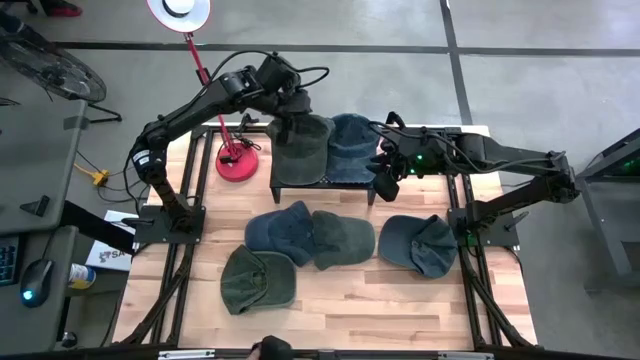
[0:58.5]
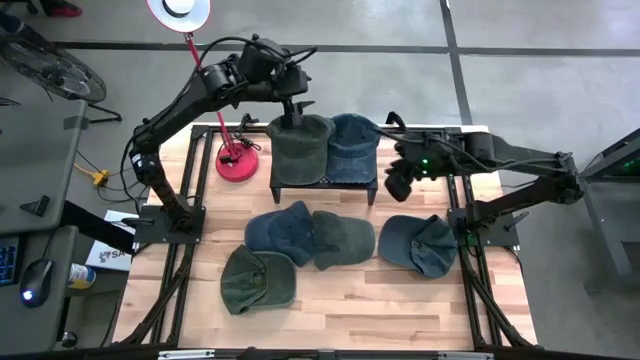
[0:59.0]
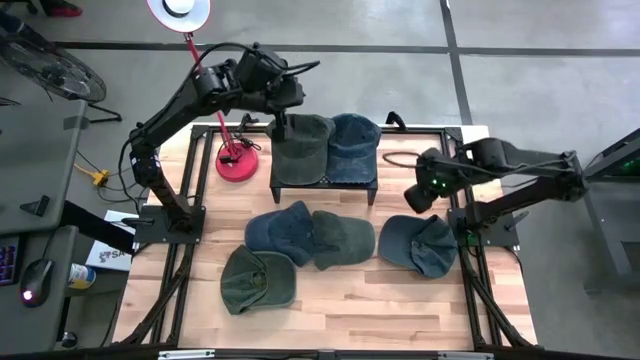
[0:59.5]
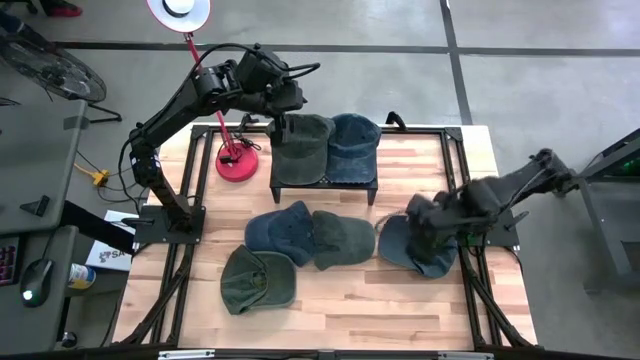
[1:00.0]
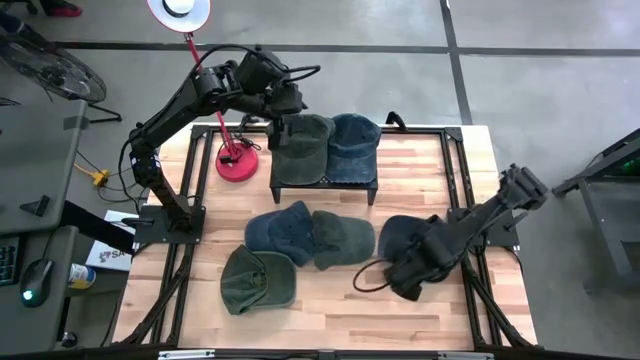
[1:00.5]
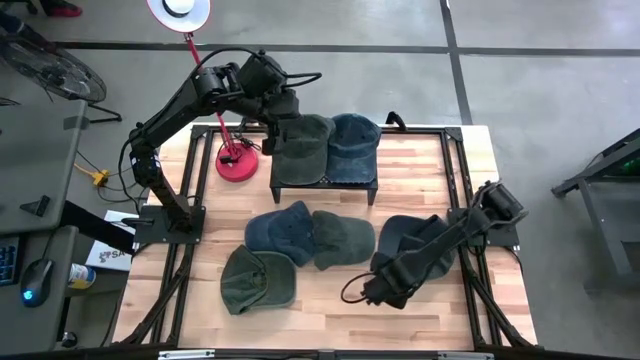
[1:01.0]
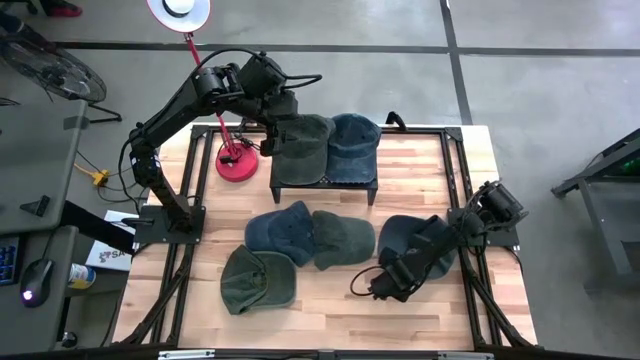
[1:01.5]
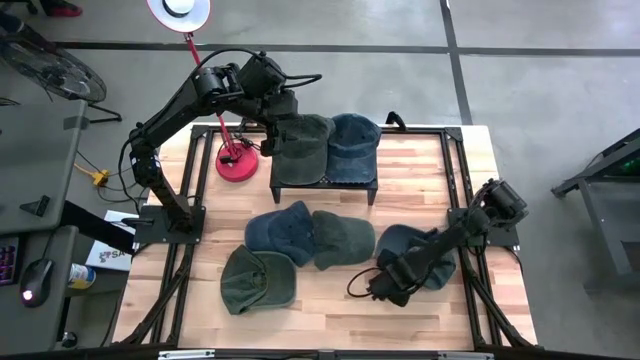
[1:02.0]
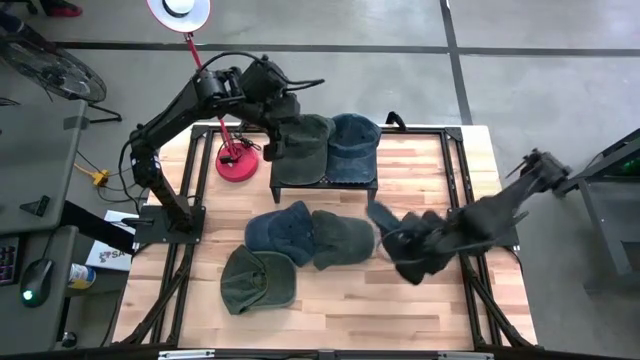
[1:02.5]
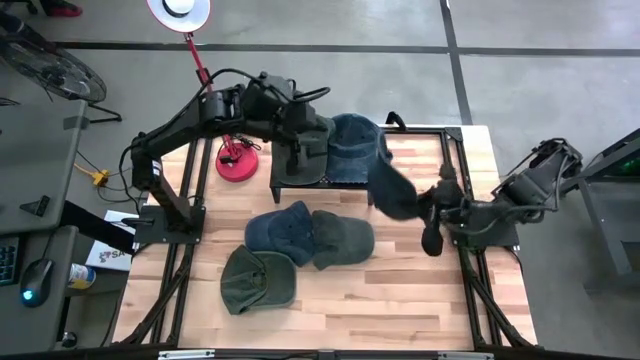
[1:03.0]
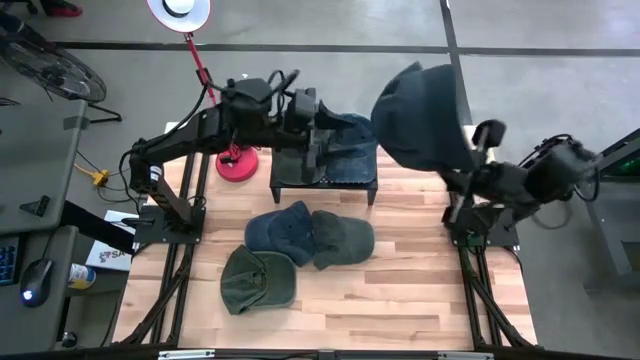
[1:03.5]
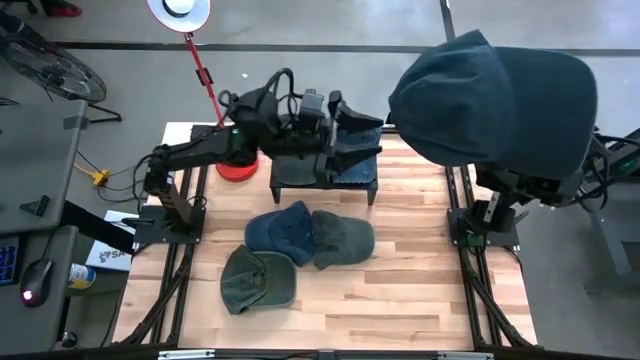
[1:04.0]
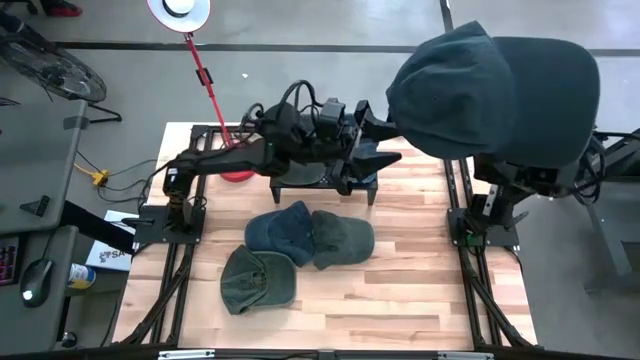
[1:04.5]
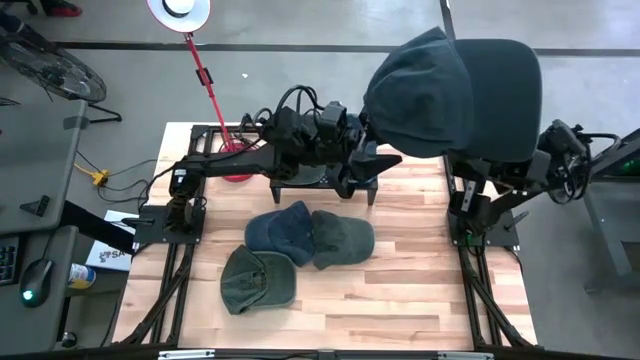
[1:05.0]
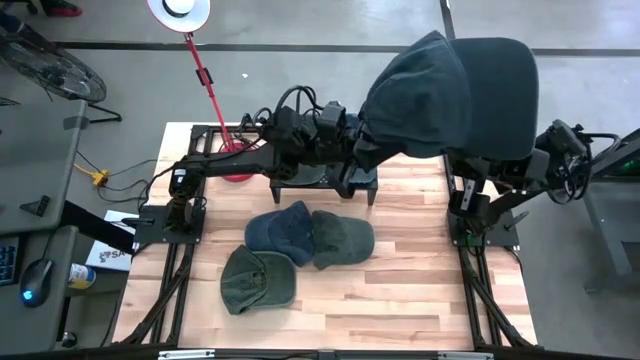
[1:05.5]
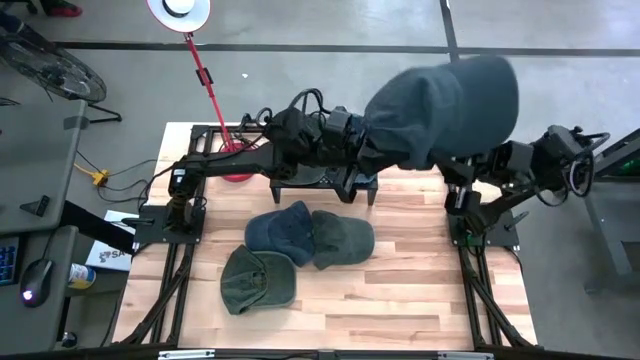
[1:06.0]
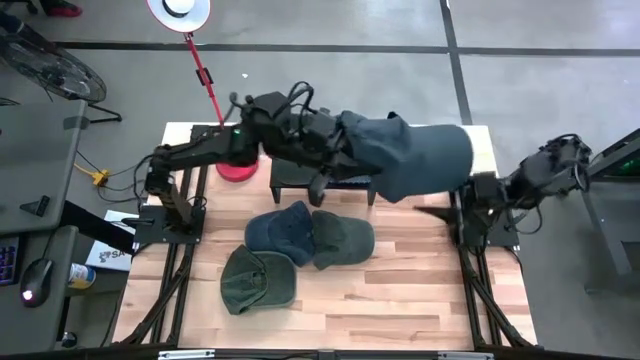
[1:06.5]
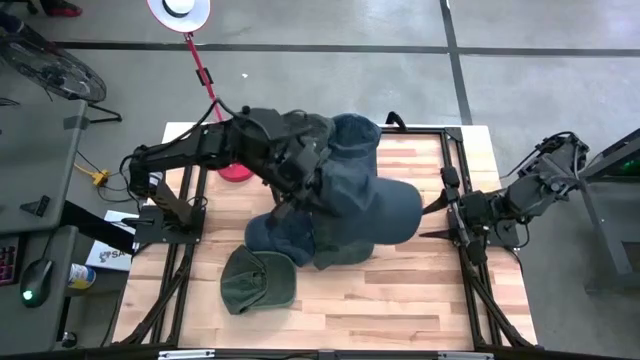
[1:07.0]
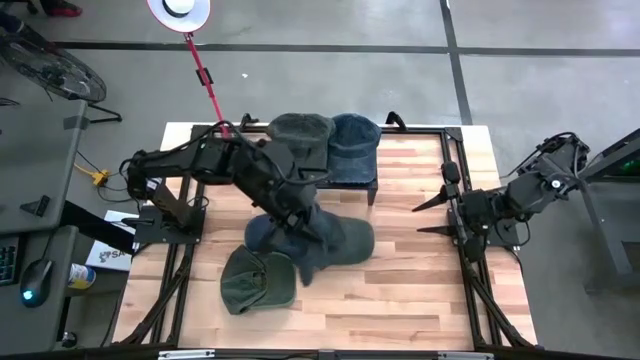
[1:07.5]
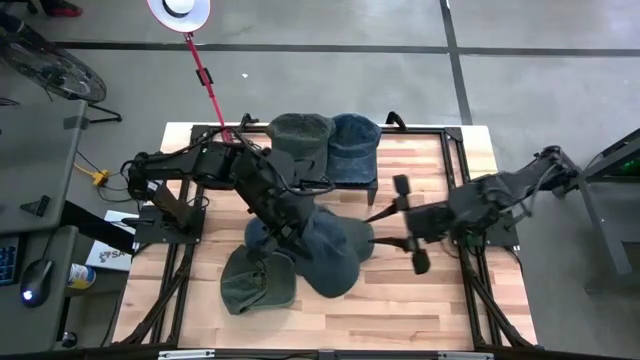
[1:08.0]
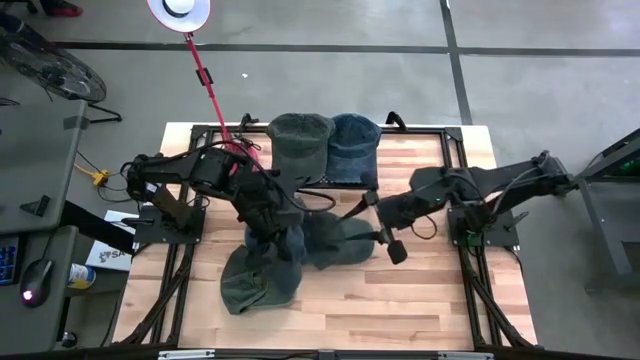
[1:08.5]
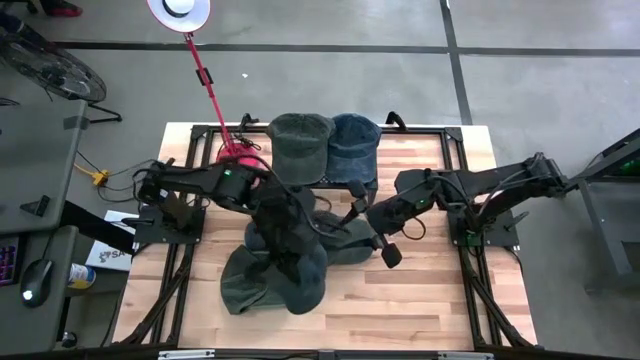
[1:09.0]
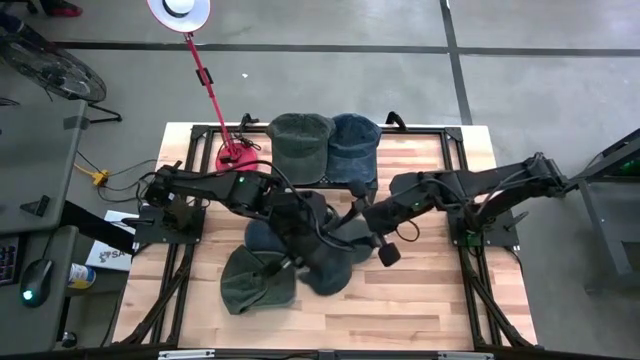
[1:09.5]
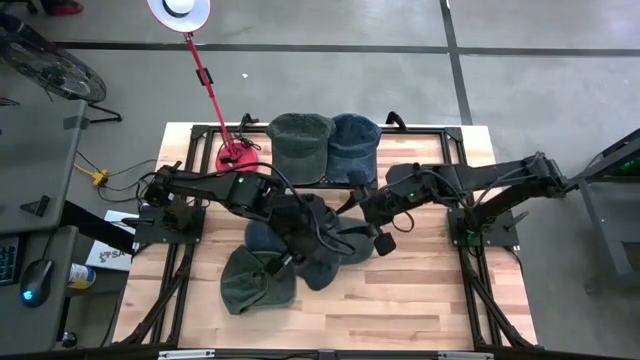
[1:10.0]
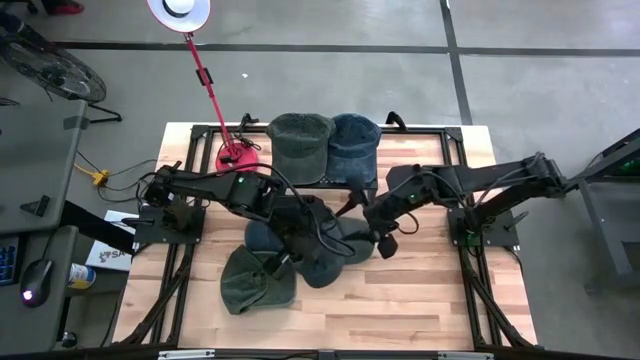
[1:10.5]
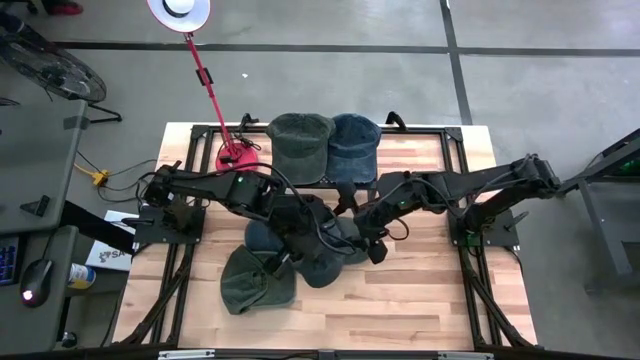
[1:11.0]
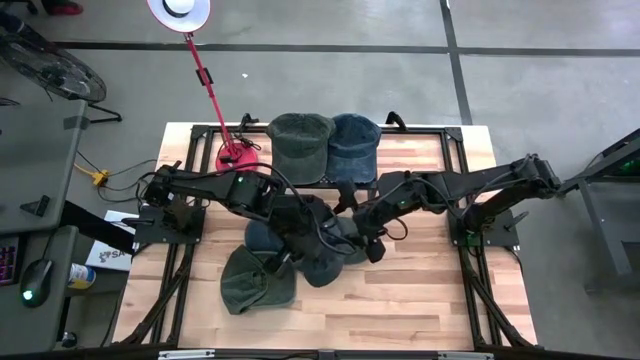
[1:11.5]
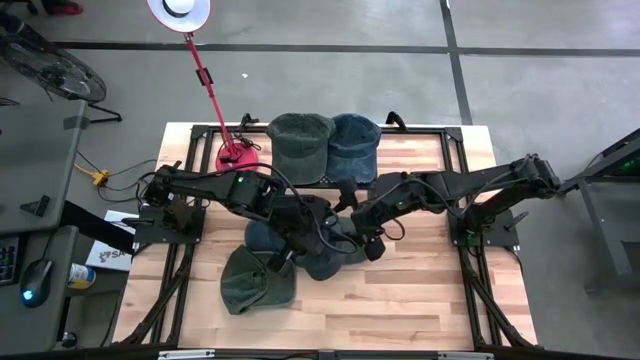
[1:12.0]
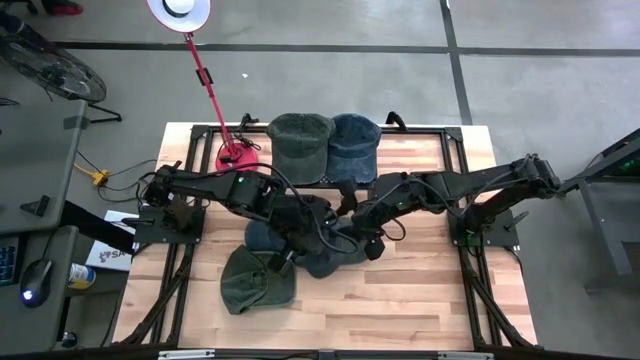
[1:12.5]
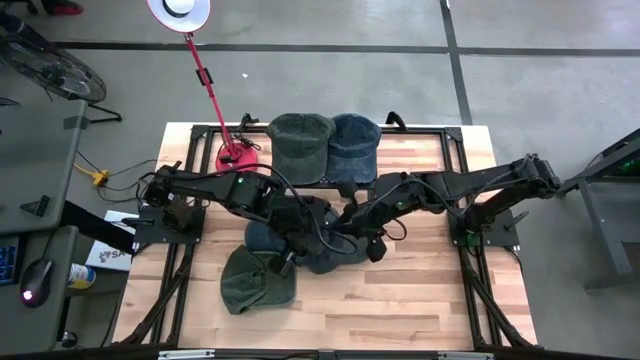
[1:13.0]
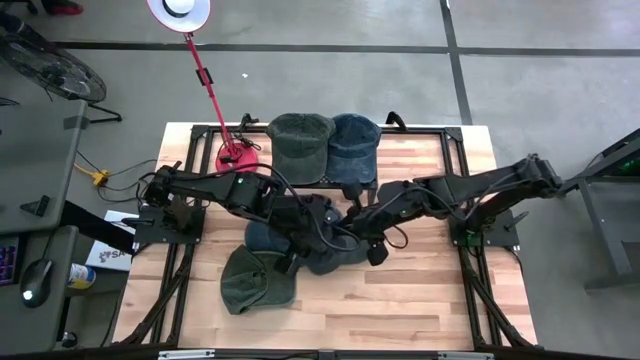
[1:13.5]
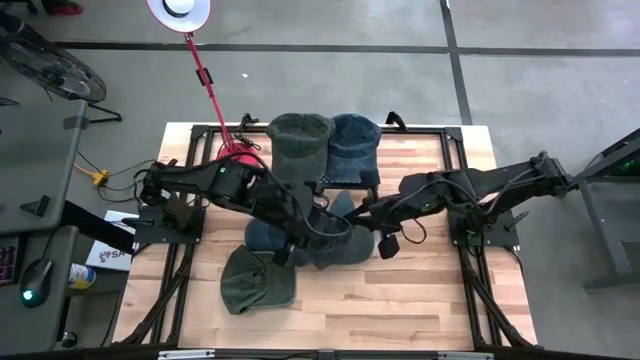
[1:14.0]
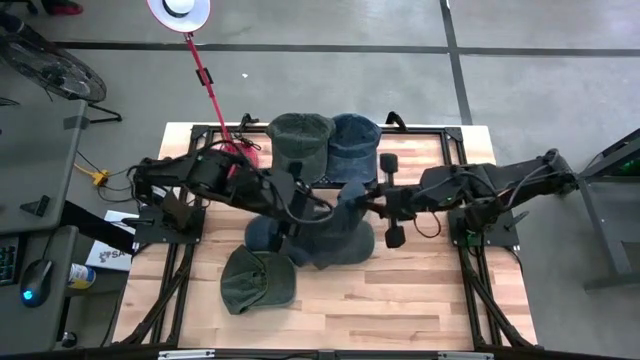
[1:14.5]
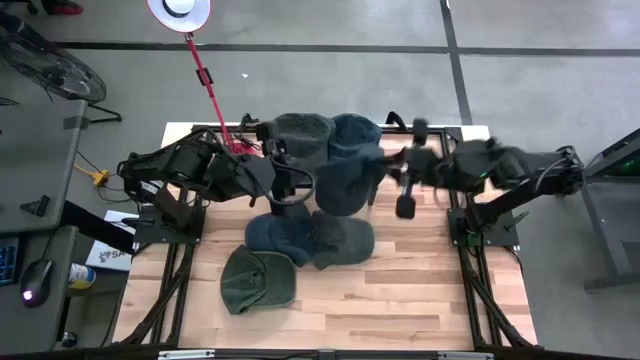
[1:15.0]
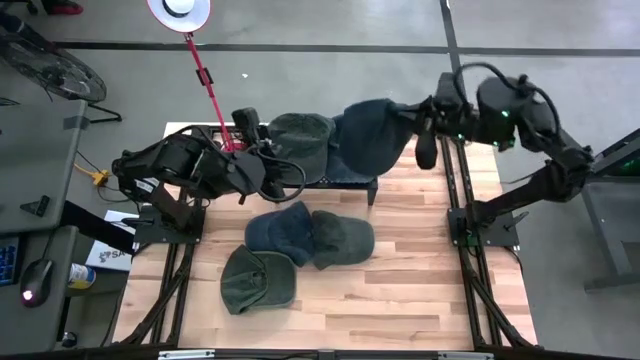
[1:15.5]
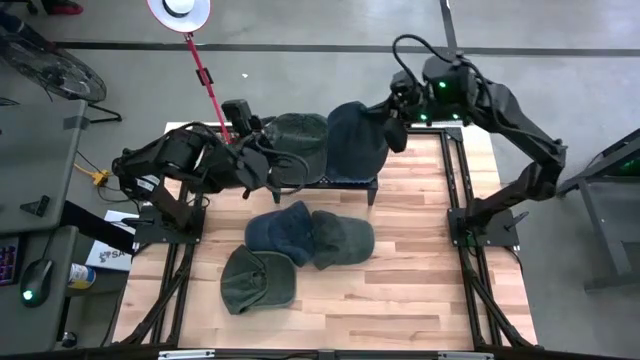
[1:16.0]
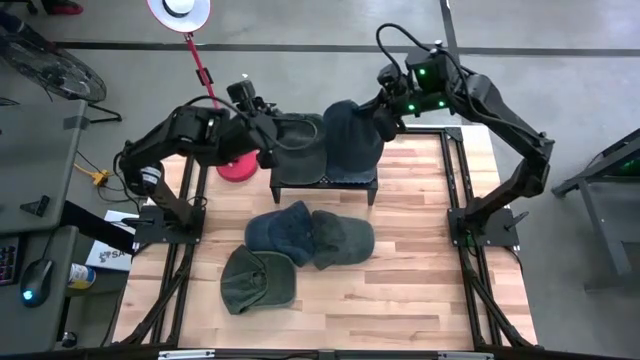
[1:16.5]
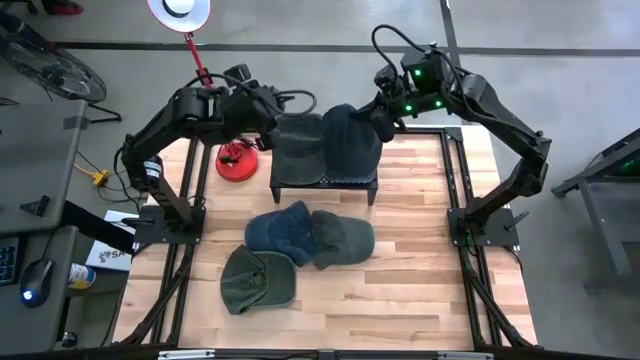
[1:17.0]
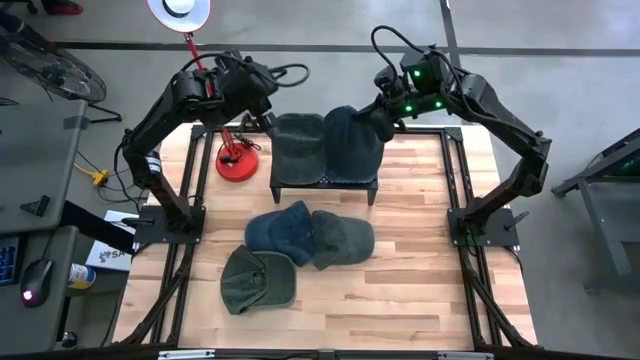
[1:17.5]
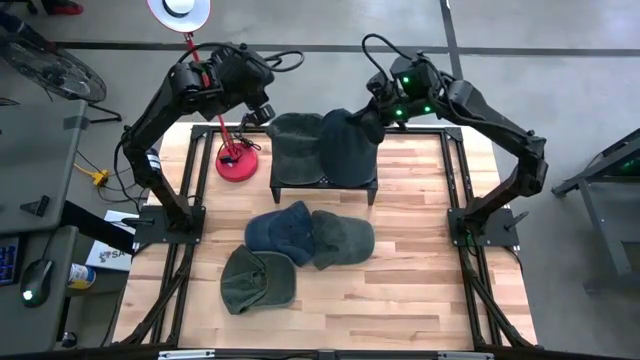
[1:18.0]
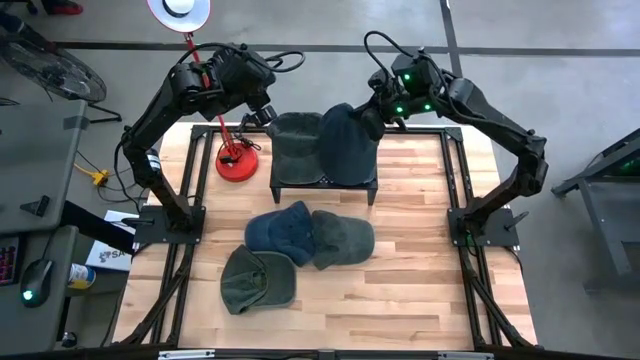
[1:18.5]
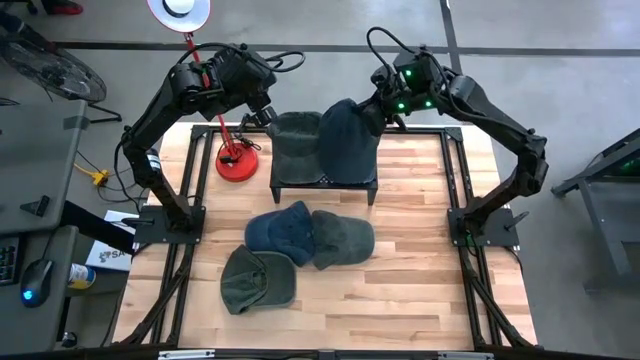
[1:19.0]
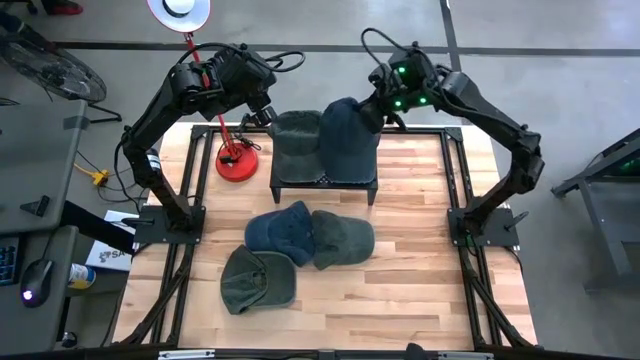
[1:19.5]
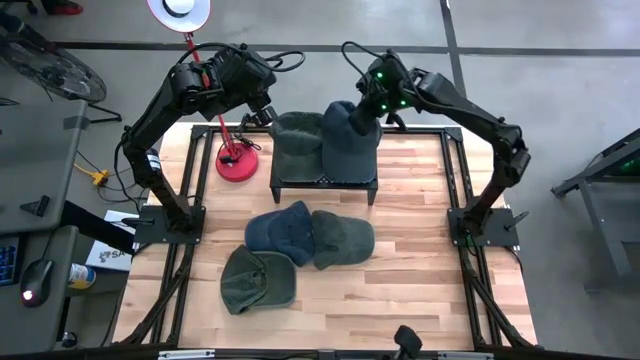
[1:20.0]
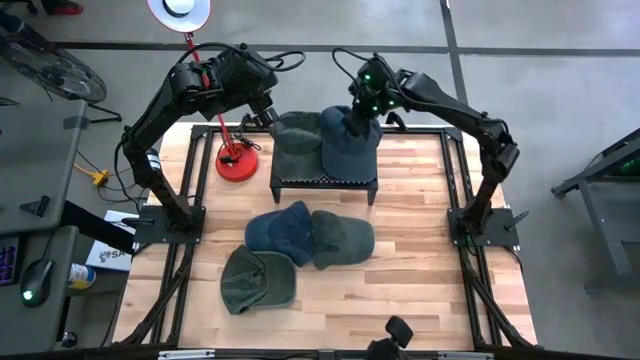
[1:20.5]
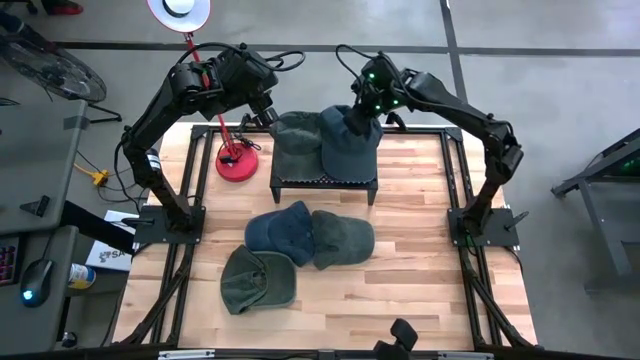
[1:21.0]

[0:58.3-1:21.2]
Task: Pick & Place hat
Stack the right blue cap on top of the other blue cap on the shelf
